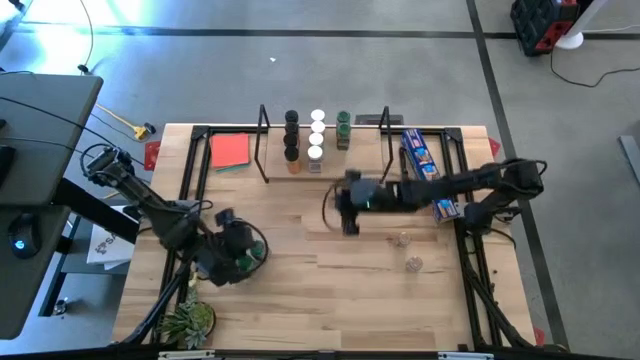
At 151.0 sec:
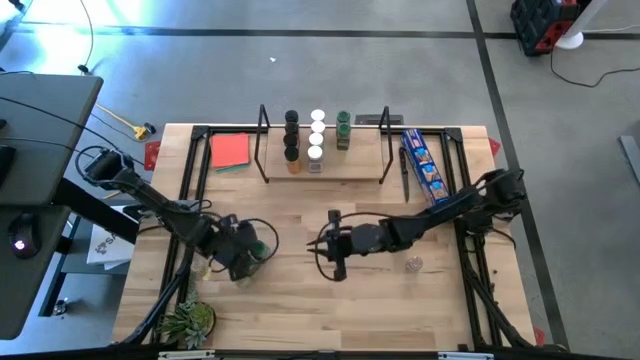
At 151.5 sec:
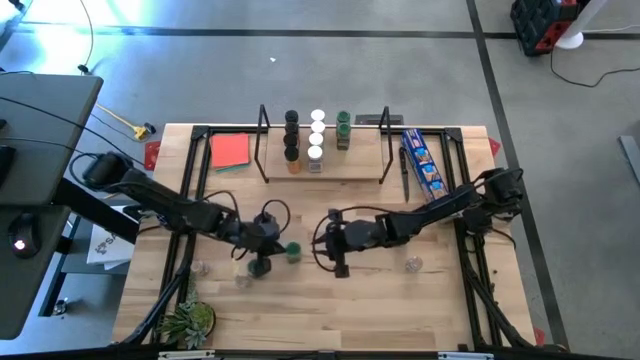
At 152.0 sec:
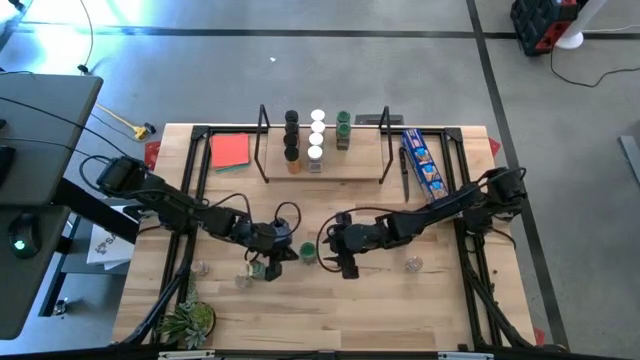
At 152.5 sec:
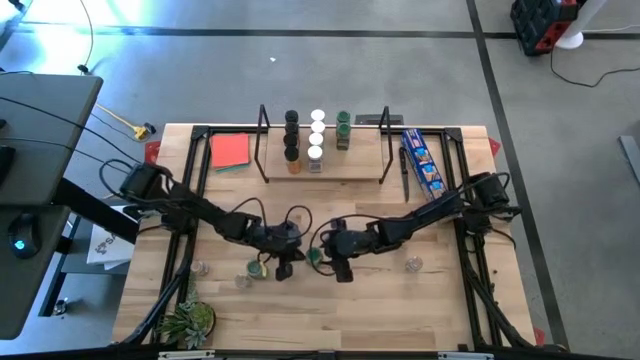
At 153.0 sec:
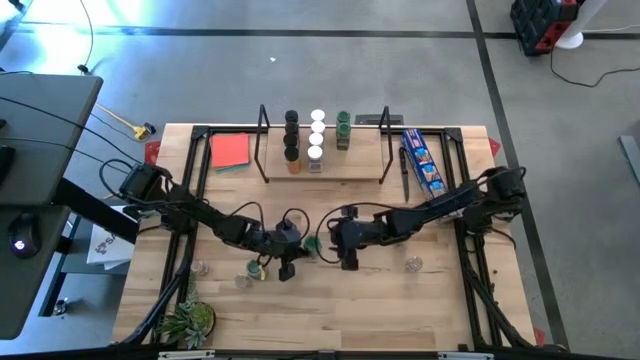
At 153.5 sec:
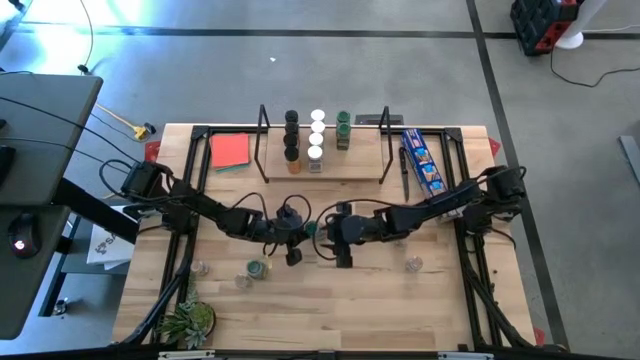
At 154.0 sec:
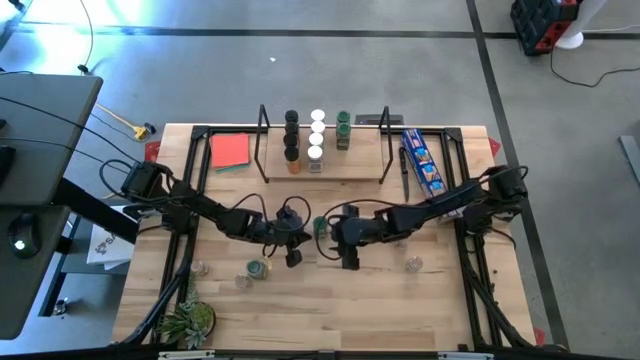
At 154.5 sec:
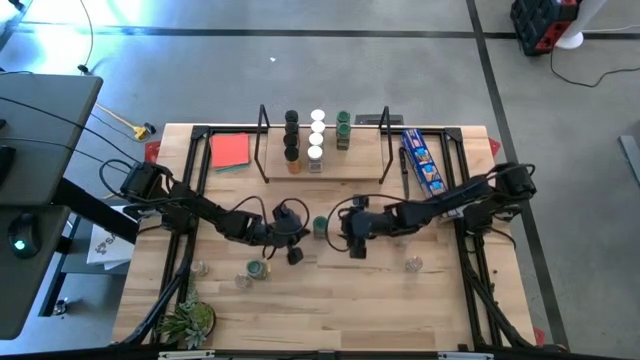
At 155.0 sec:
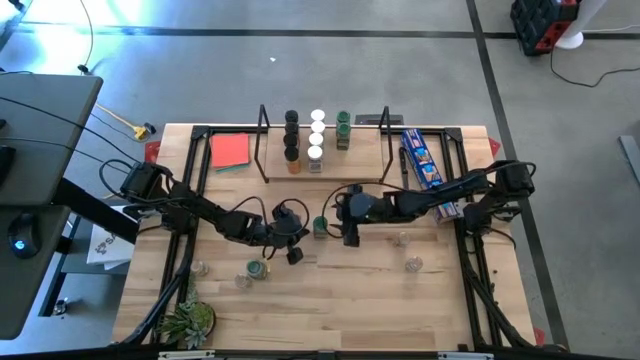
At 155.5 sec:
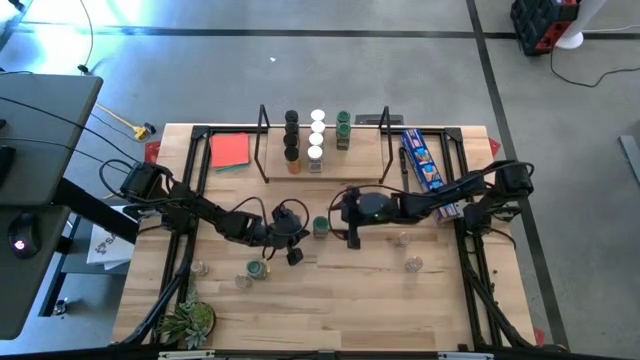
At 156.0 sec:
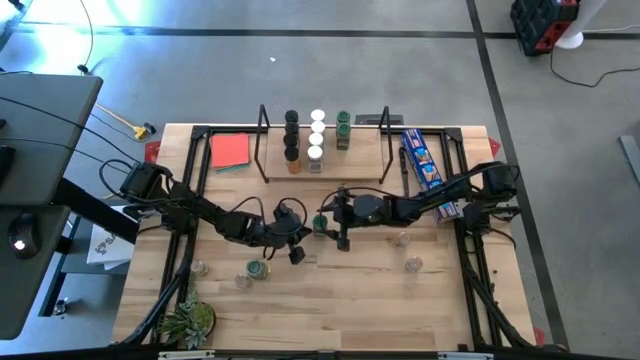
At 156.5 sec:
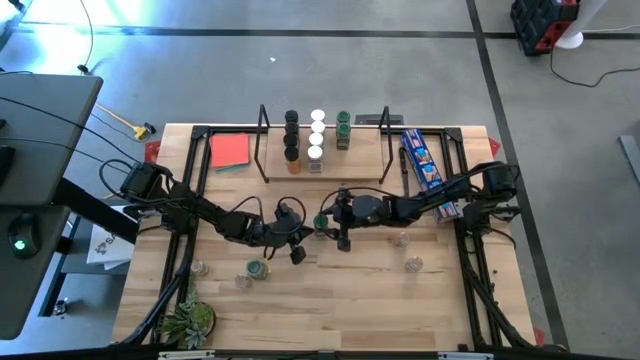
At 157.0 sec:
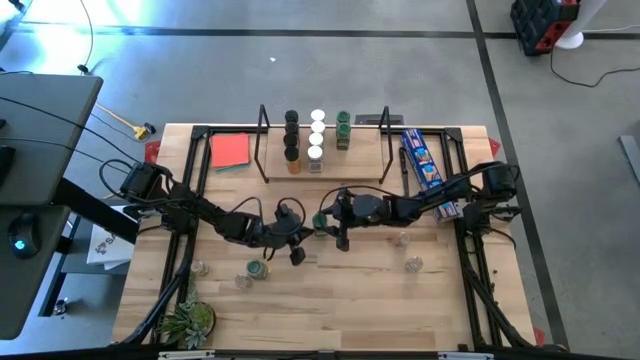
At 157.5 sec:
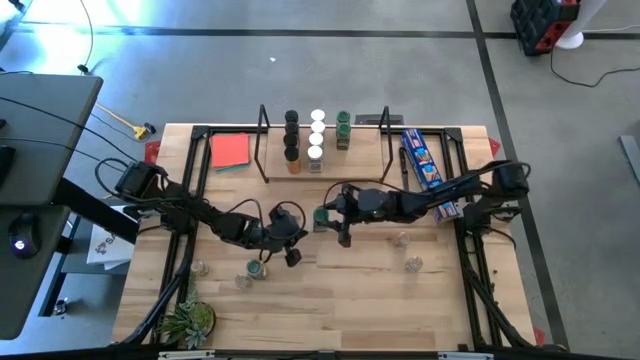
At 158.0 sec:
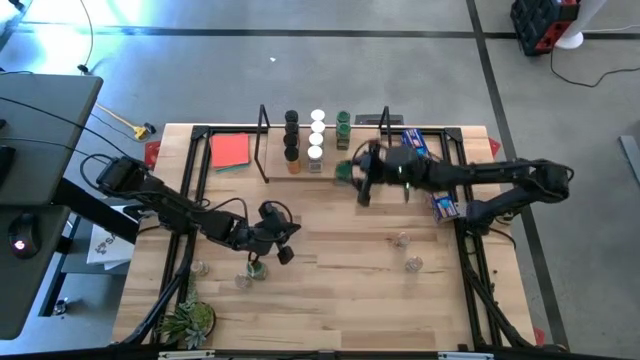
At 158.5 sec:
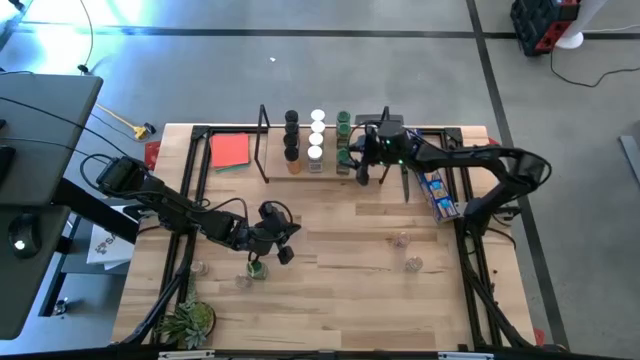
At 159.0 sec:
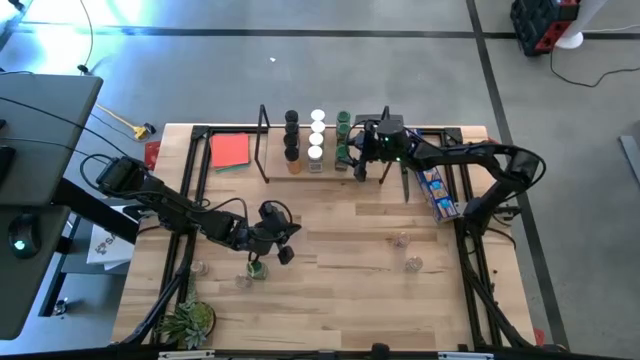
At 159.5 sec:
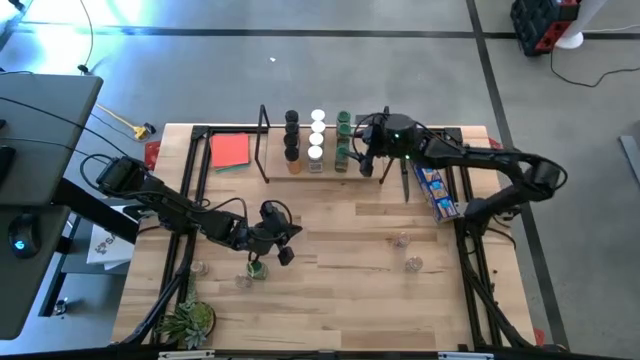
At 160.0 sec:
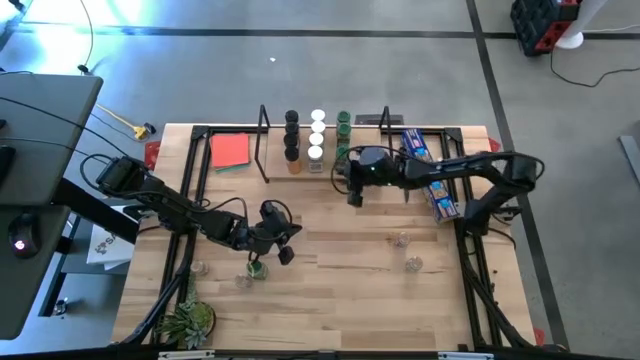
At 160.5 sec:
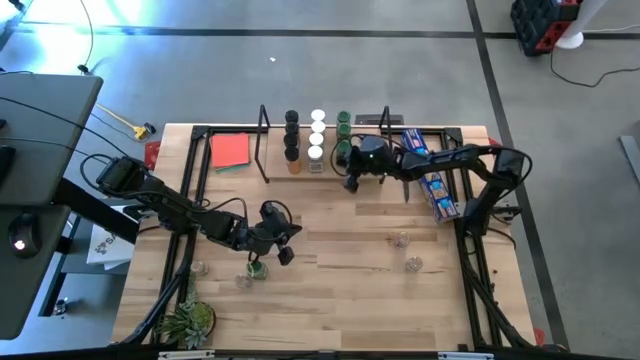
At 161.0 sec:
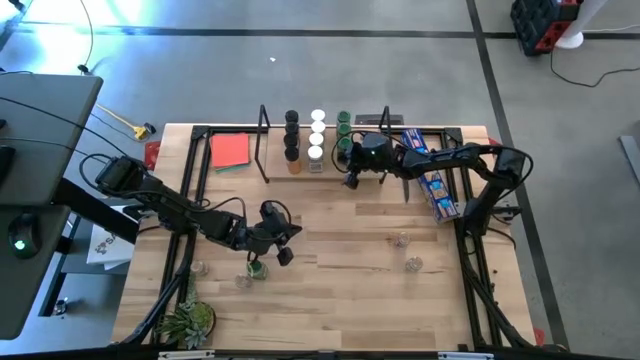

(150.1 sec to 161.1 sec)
Task: Shelf spices
Put the green seasoning bottle on the shelf aligned with the other green seasoning bottles

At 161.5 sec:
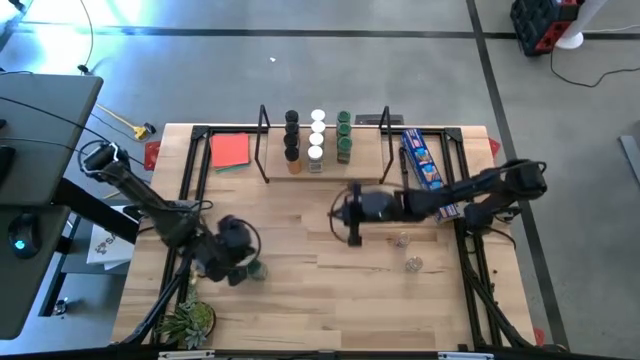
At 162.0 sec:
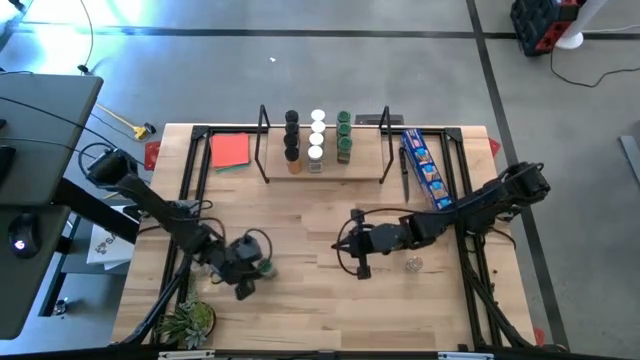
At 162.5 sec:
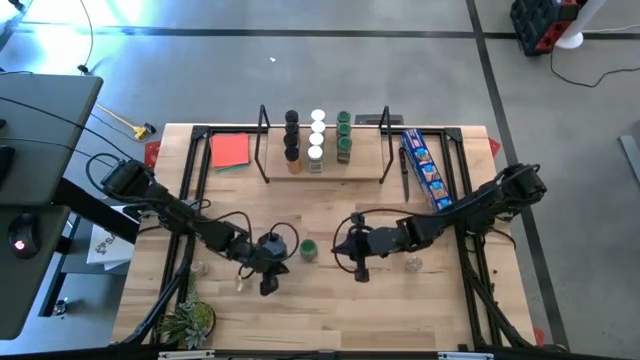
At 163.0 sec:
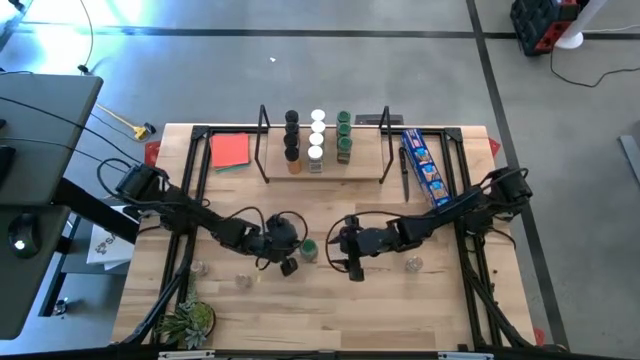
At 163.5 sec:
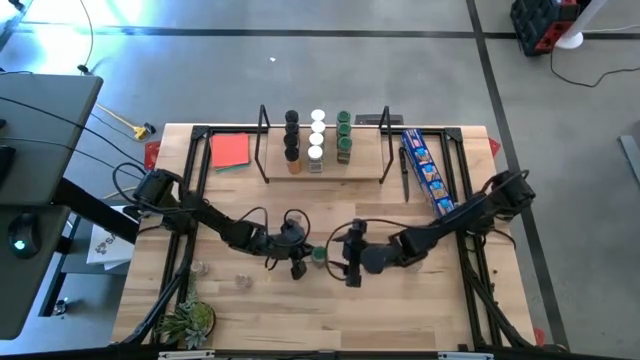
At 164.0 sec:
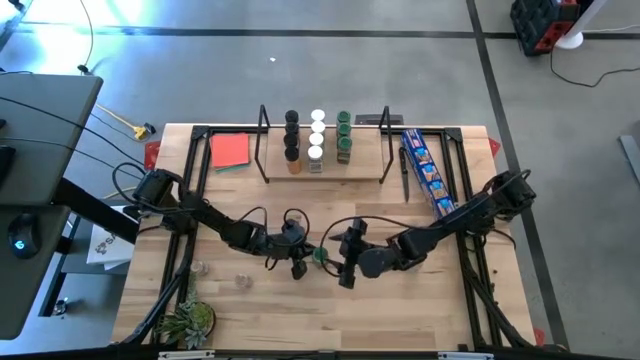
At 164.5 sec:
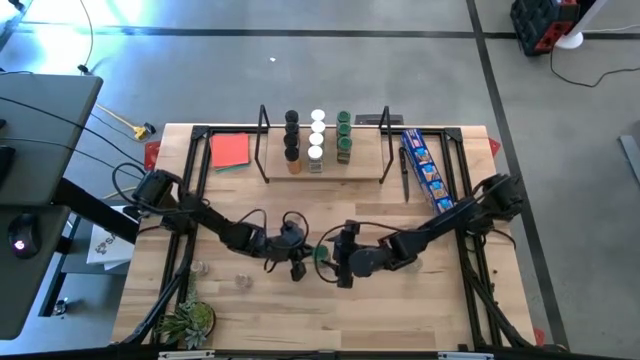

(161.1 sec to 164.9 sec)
Put the green seasoning bottle on the shelf aligned with the other green seasoning bottles

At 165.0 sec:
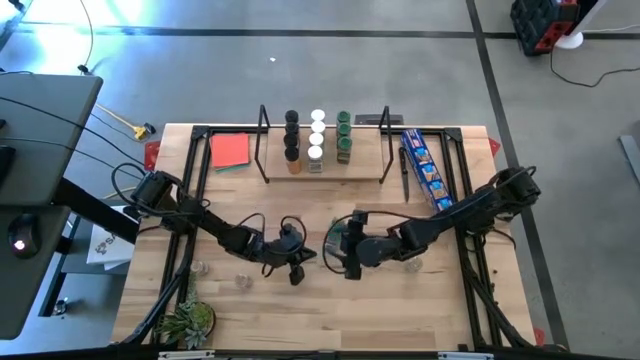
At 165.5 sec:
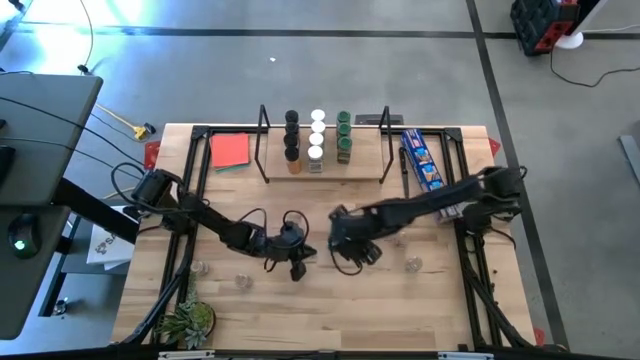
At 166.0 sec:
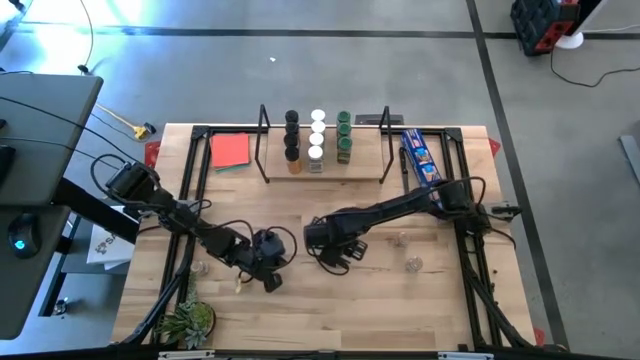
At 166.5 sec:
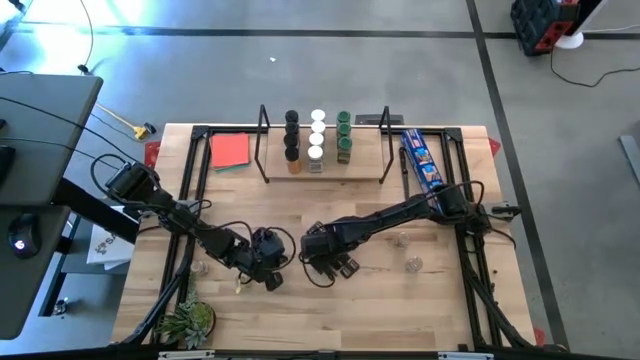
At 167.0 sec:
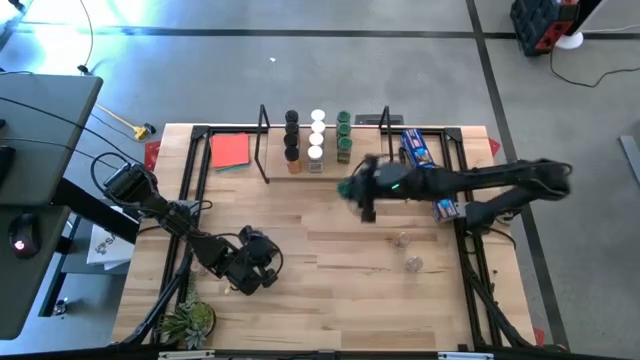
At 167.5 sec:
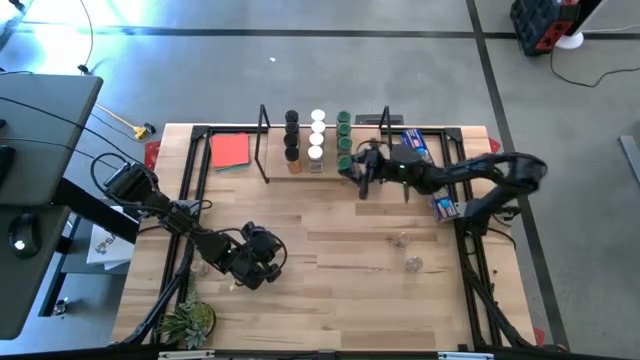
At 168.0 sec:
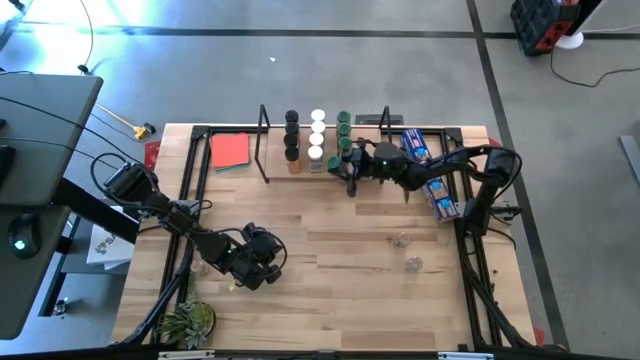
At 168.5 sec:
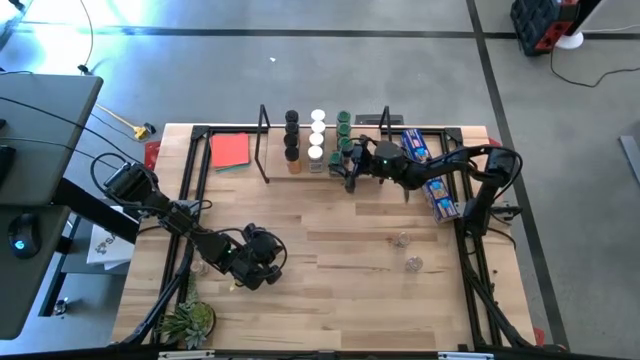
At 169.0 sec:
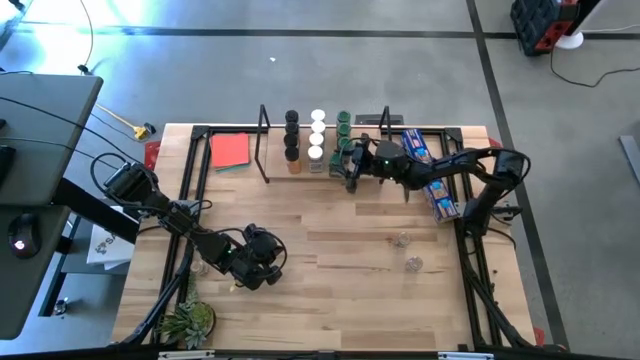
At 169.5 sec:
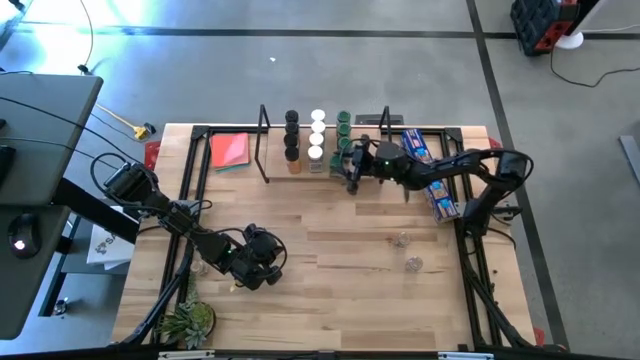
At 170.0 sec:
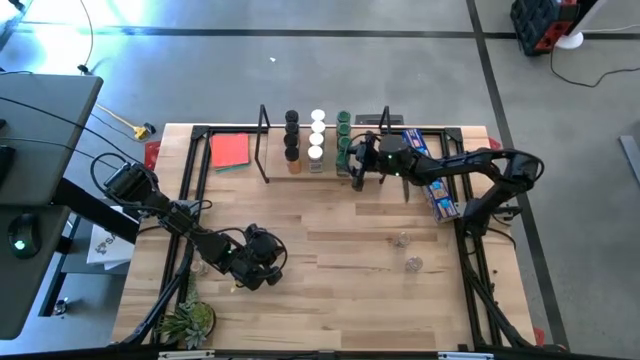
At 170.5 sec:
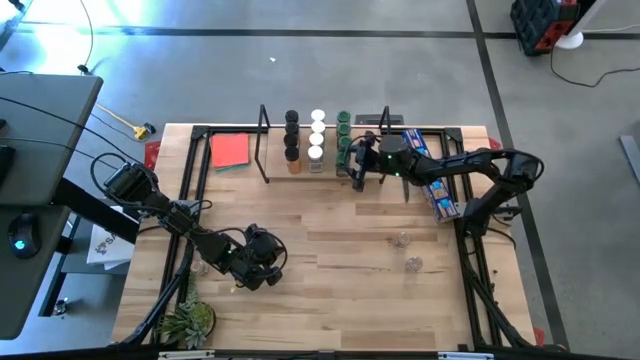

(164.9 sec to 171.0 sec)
Put the green seasoning bottle on the shelf aligned with the other green seasoning bottles

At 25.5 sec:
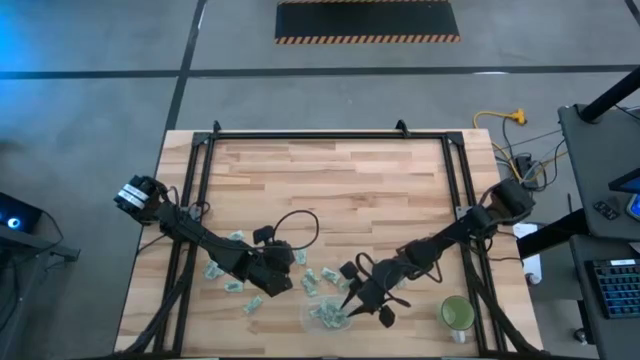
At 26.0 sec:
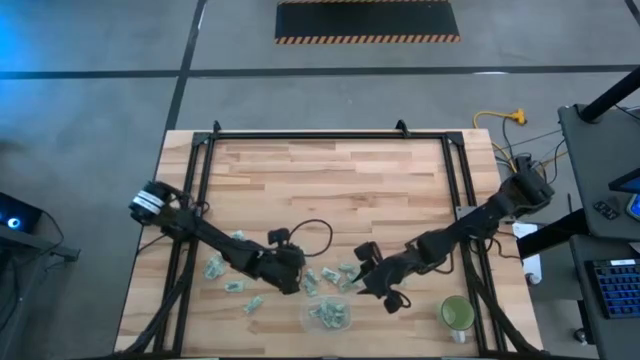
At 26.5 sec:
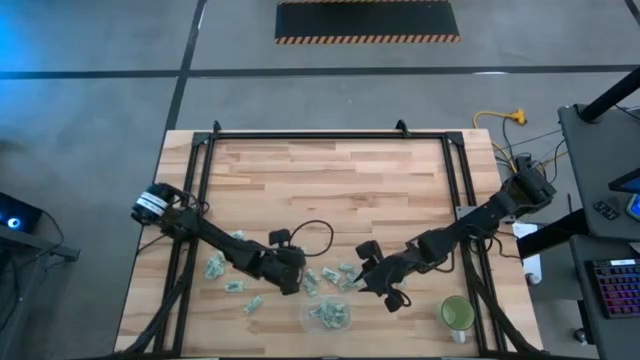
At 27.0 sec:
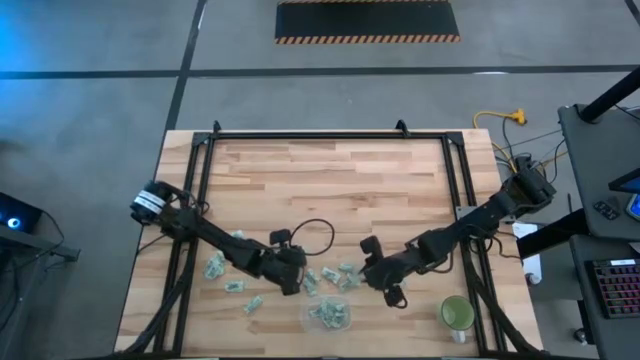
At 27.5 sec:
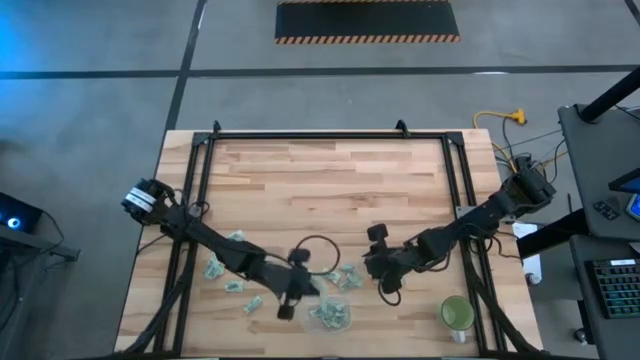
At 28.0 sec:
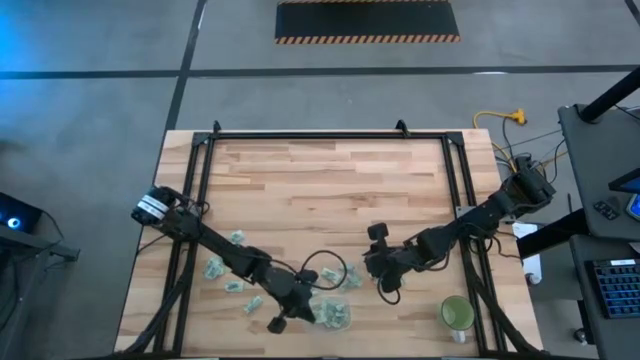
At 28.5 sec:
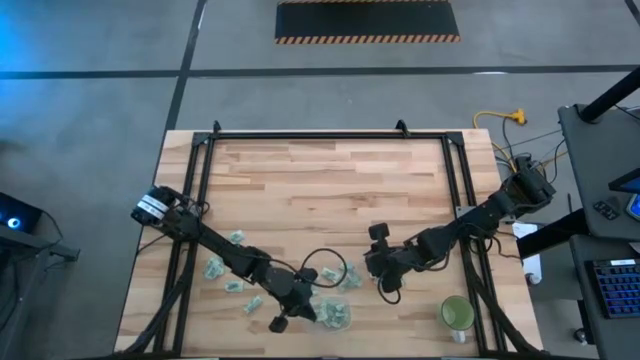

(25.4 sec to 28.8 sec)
Task: Pick and place Stevia / Truvia into bins
Put the stevia packet into the transparent container
